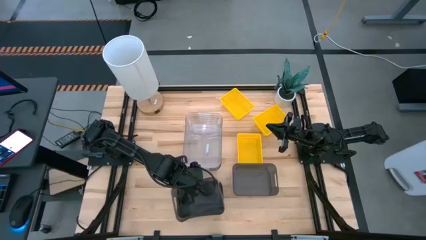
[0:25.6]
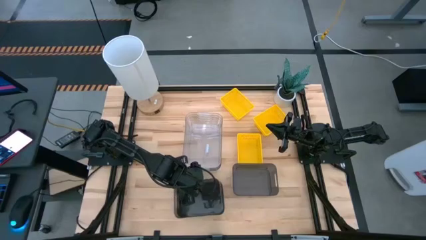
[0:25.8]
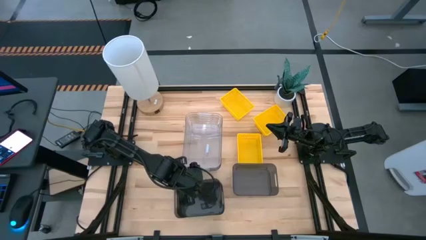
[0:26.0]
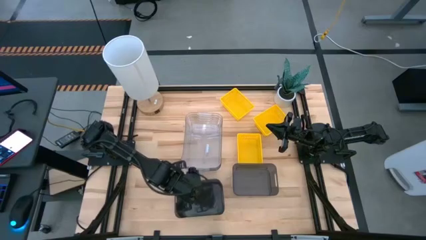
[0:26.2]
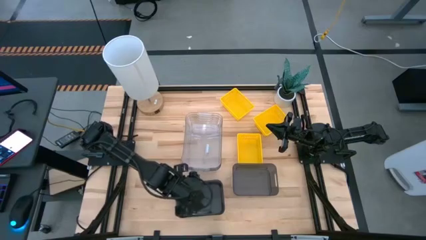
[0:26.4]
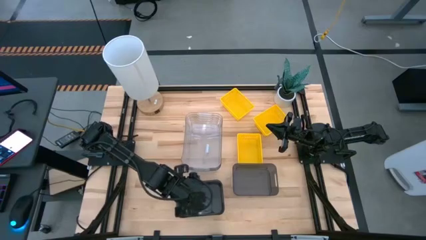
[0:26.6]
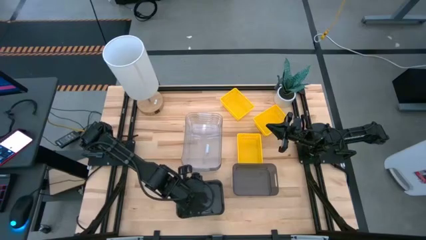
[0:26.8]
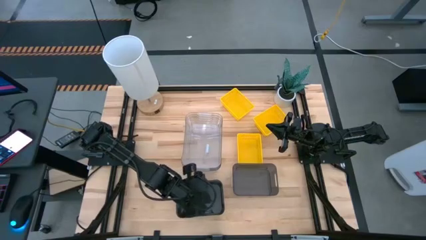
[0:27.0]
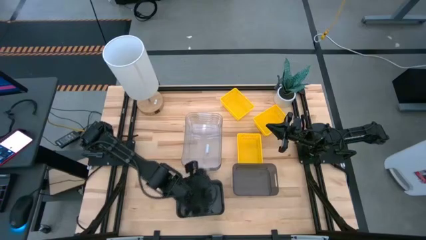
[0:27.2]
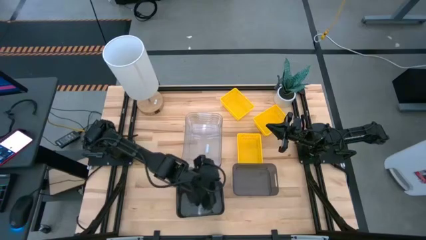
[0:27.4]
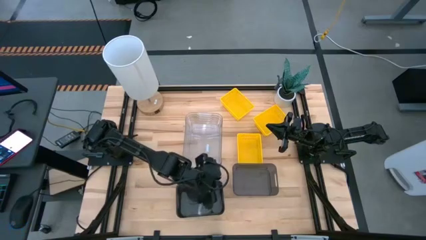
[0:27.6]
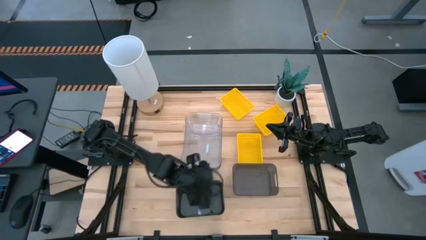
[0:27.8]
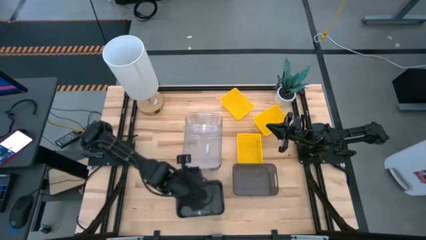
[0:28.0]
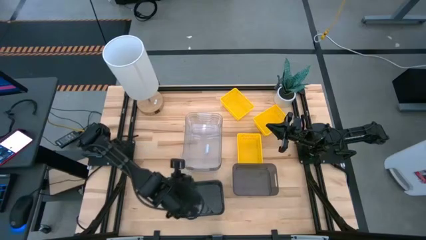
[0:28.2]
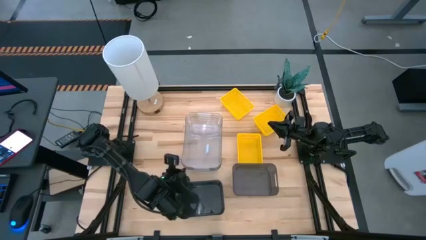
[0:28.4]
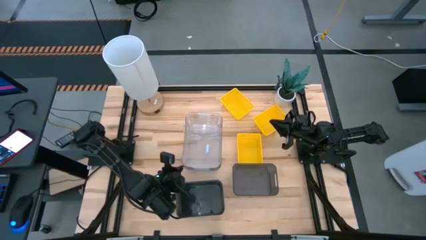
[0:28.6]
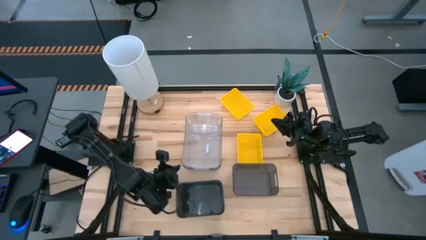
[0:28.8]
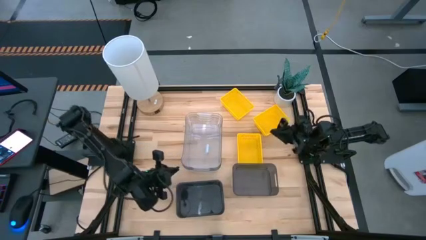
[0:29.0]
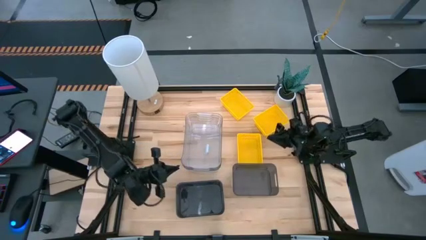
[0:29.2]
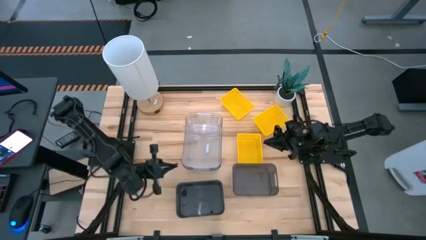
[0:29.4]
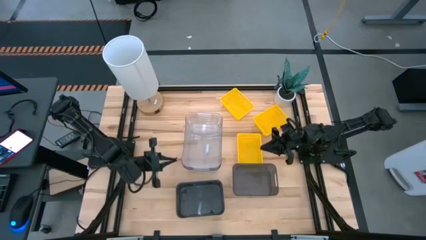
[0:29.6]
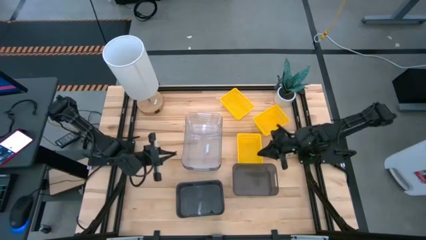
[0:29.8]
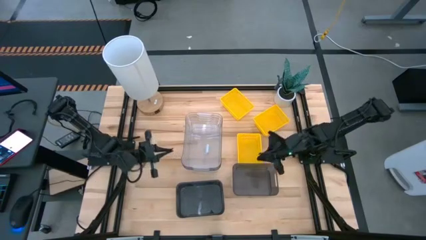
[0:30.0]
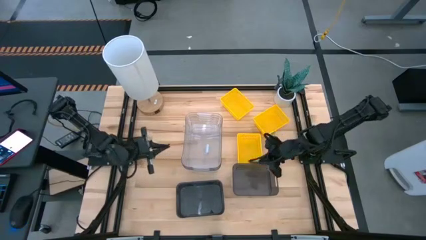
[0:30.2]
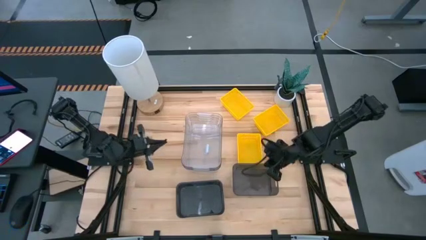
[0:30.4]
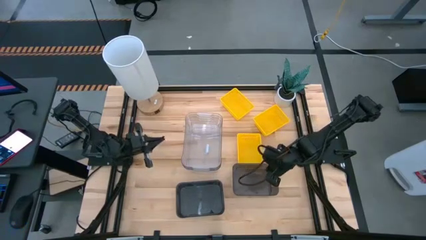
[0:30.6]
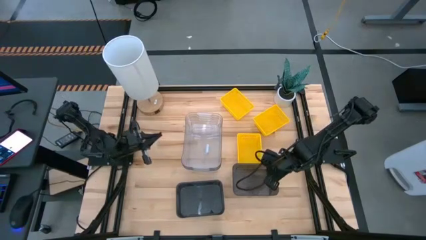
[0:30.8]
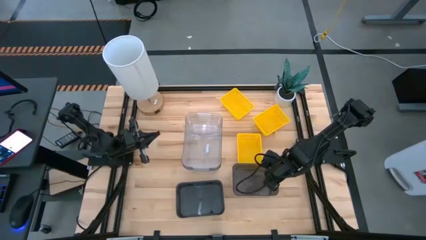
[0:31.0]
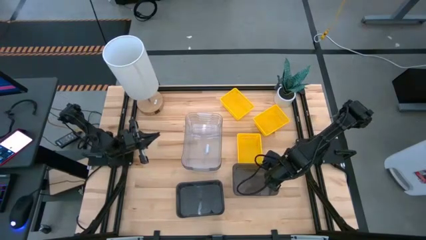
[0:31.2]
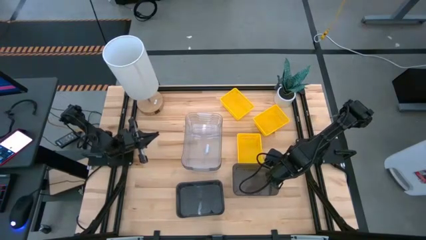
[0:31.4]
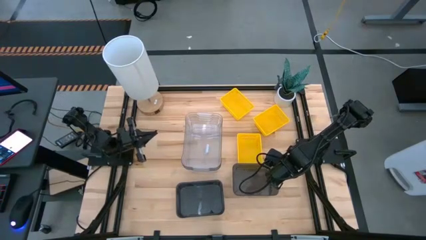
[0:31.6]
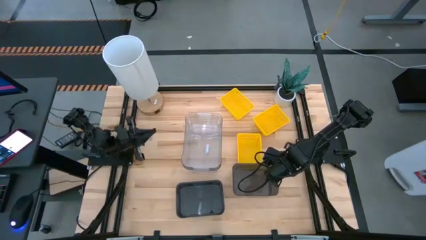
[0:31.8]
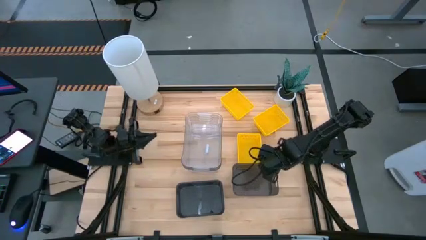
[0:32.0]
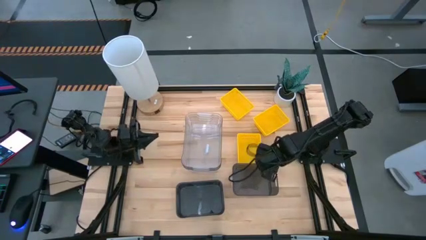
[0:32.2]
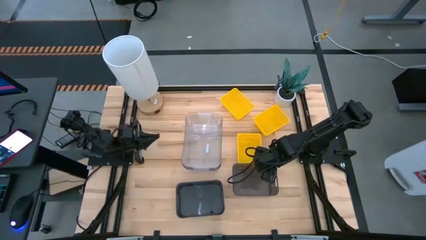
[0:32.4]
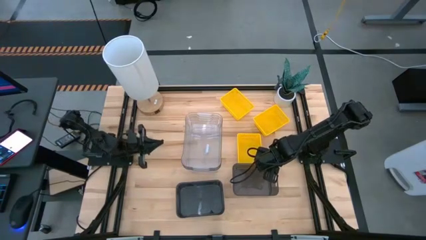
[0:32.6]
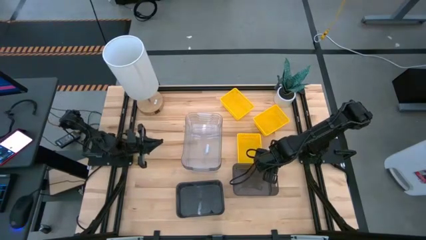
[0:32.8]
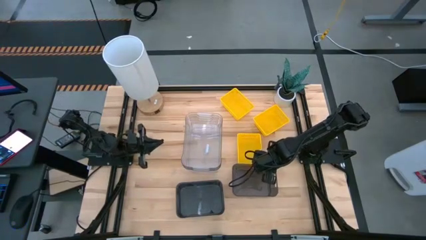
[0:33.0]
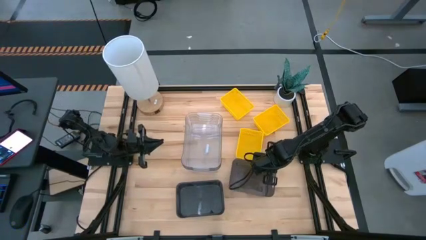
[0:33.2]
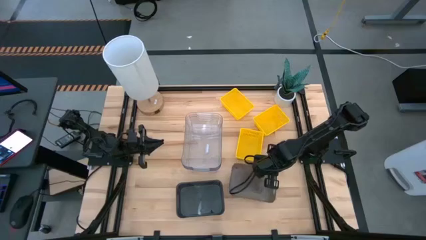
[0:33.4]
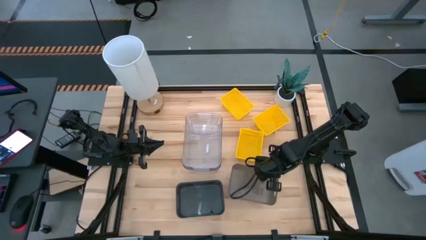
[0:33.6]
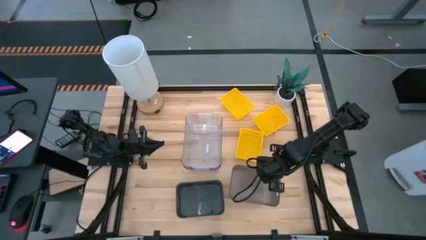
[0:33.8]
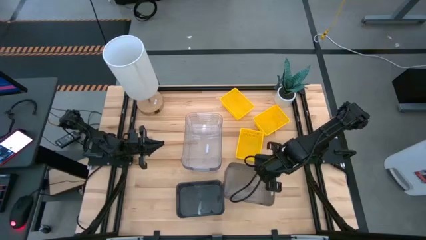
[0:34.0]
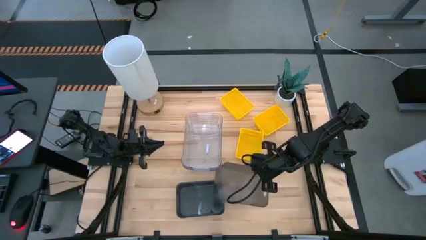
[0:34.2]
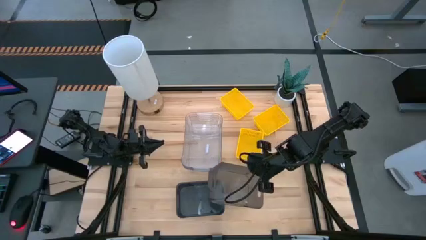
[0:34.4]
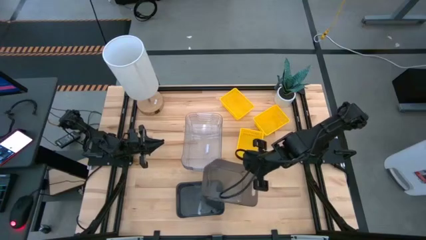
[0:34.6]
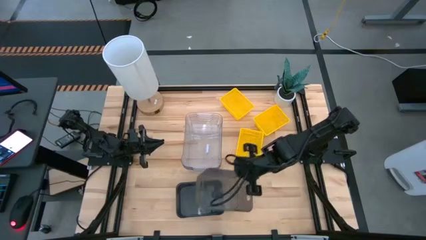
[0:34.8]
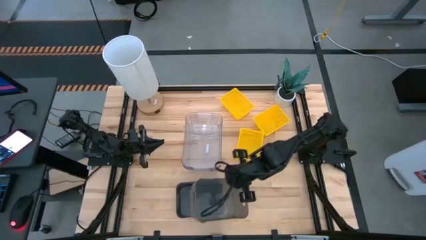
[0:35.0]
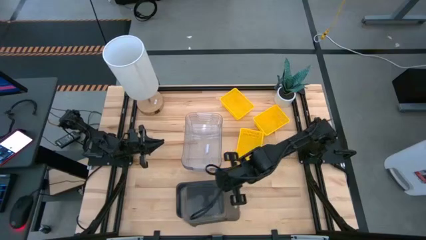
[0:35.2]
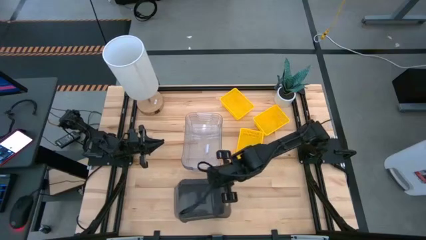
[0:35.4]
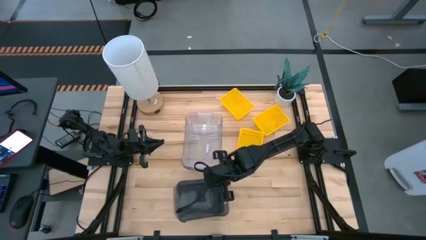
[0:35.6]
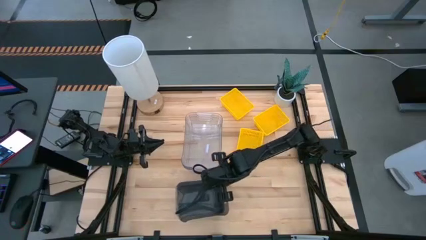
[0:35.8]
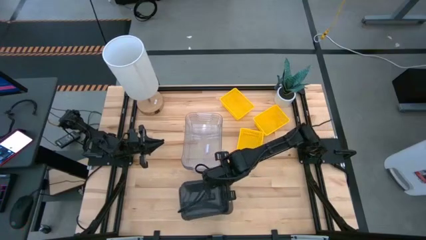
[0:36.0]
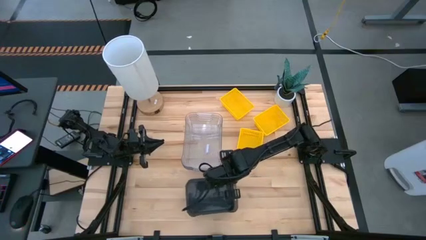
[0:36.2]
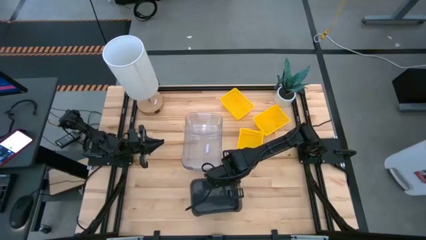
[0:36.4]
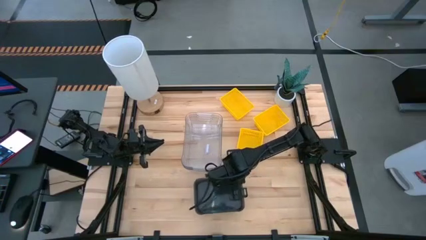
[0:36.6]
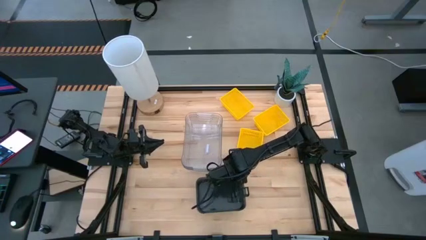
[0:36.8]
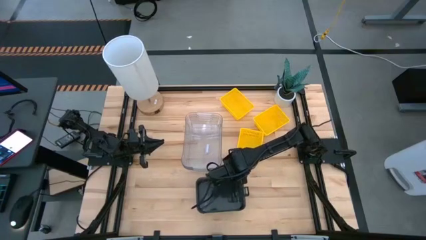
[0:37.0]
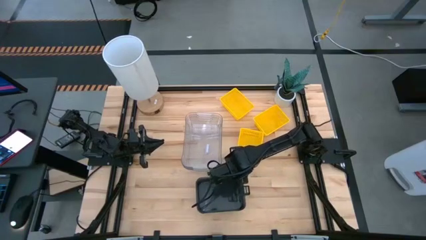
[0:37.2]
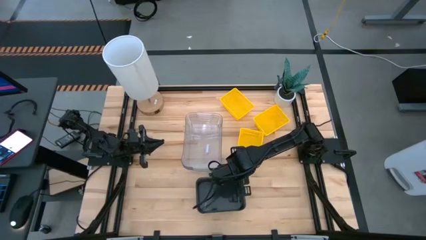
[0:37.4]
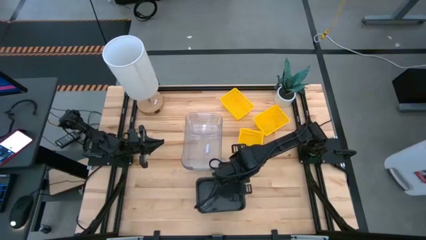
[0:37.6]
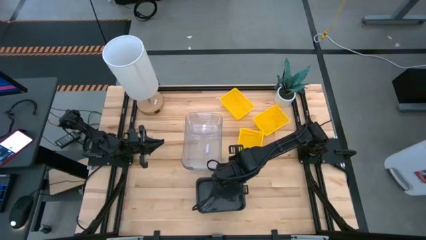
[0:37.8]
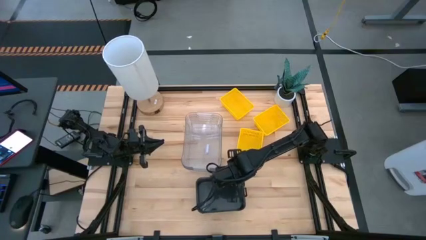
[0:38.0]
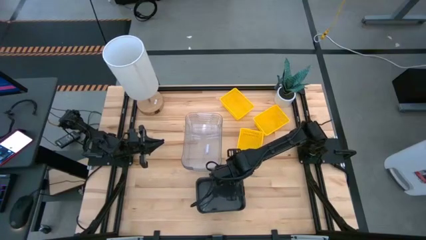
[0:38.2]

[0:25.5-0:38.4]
Stack the right black bin on the left stacked black bins

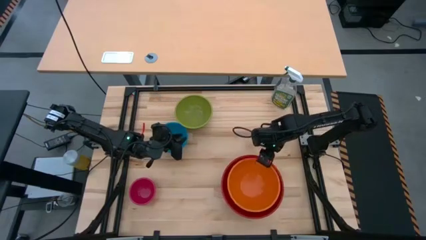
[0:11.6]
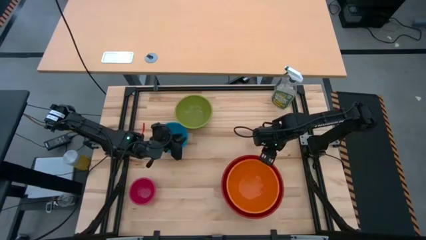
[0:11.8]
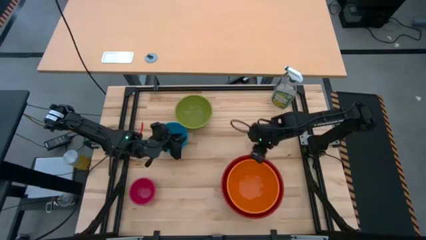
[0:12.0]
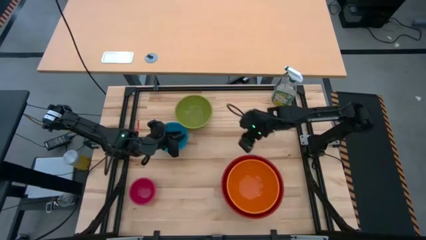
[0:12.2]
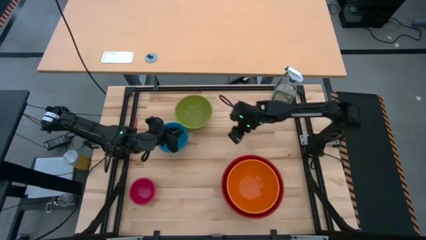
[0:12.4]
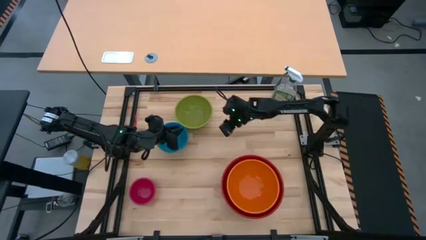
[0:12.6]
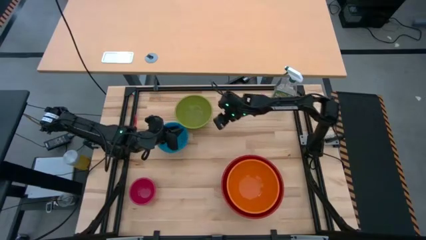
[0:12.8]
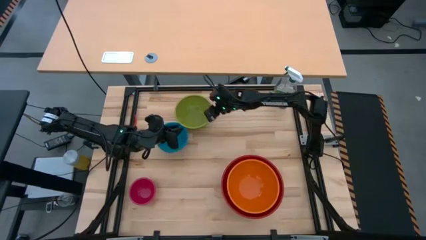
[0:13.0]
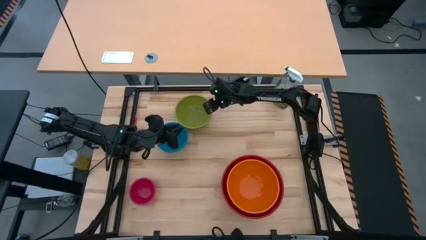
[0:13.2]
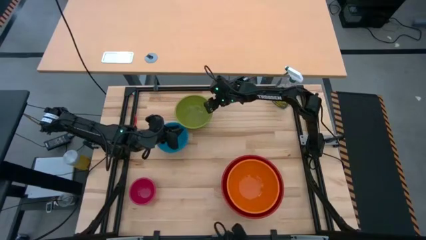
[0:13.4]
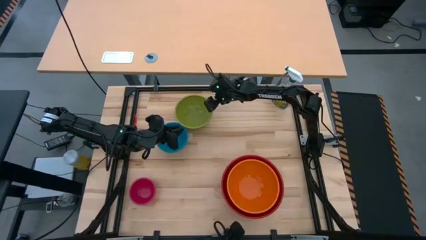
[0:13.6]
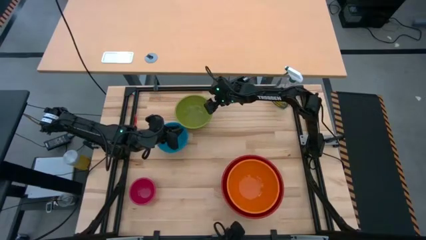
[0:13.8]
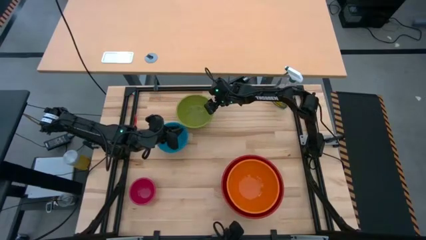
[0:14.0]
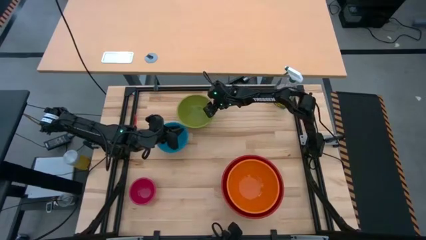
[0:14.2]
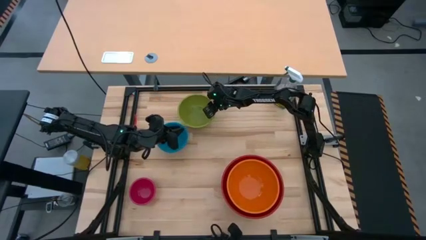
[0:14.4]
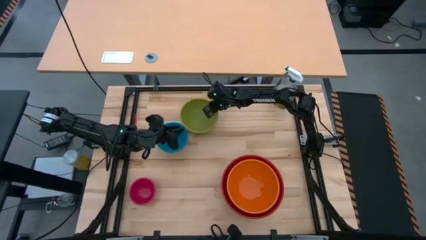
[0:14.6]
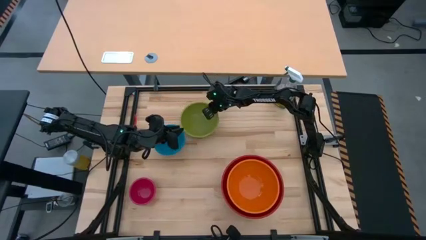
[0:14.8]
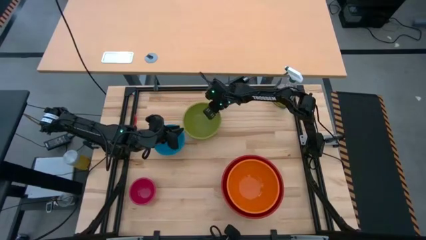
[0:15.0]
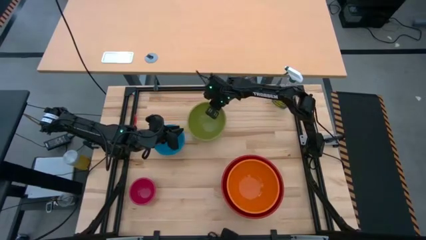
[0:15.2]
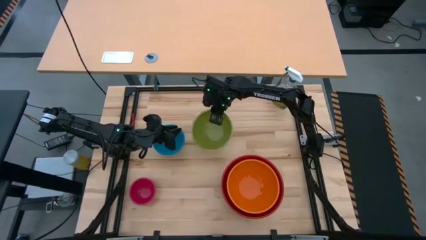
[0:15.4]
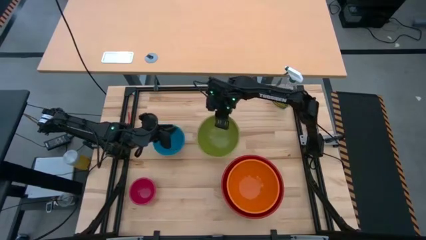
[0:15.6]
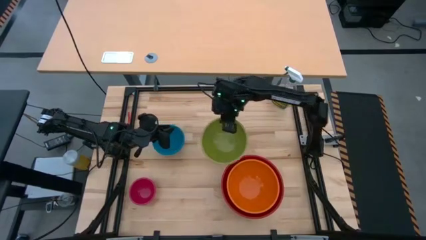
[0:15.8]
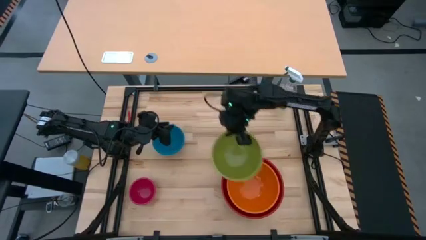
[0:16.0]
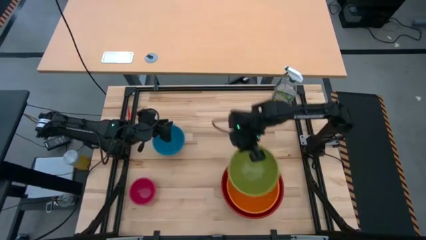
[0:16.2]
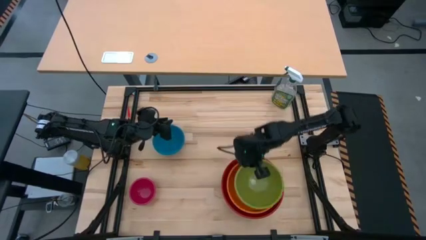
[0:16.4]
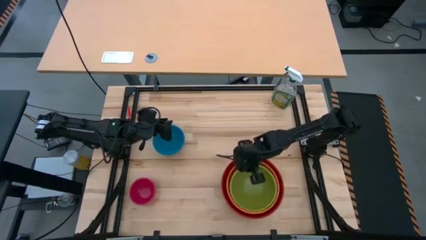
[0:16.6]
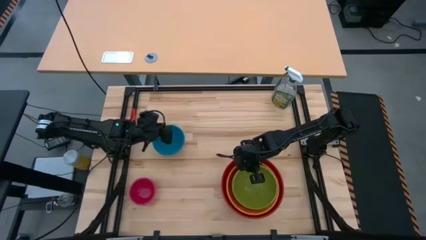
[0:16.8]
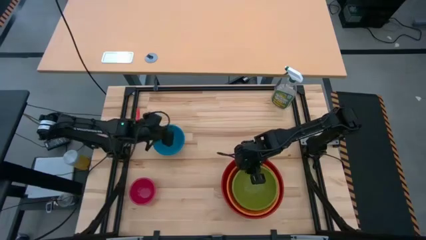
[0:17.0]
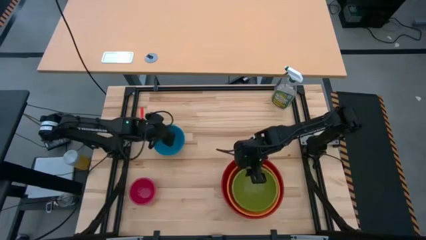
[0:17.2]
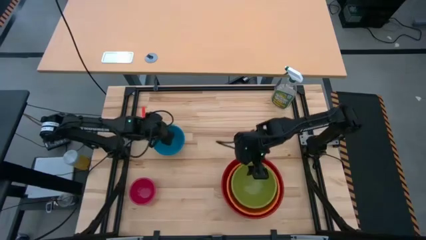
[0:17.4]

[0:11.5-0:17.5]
Stack the green bowl on top of the orange bowl
